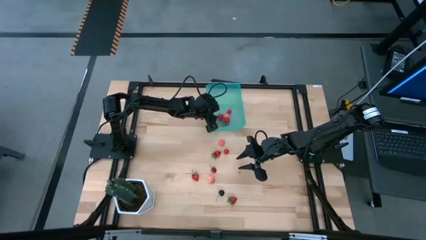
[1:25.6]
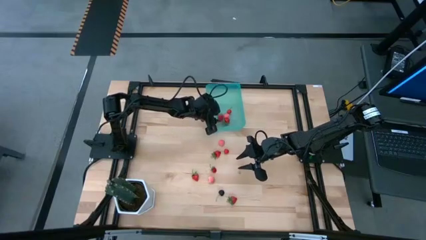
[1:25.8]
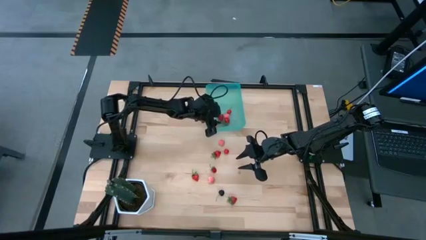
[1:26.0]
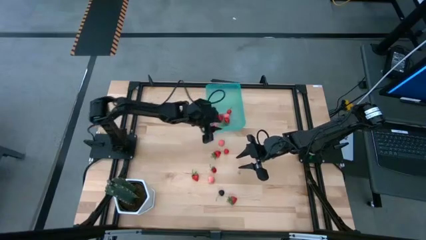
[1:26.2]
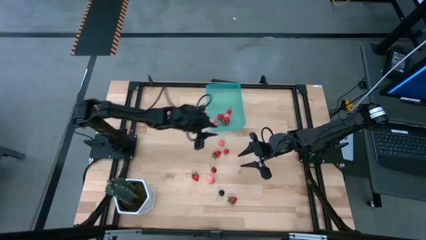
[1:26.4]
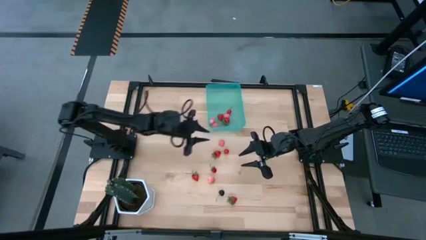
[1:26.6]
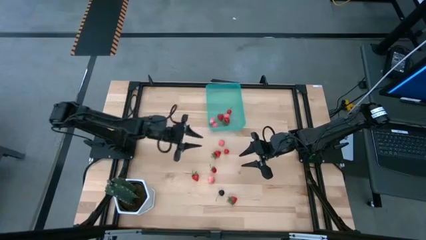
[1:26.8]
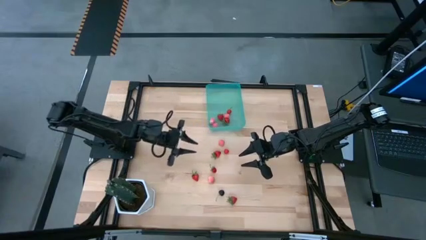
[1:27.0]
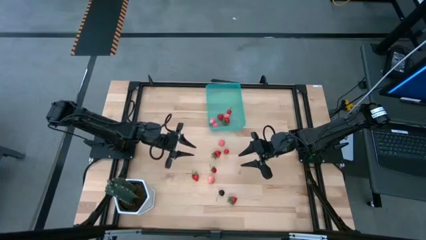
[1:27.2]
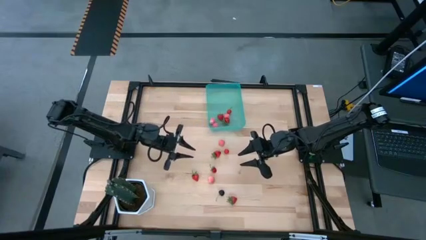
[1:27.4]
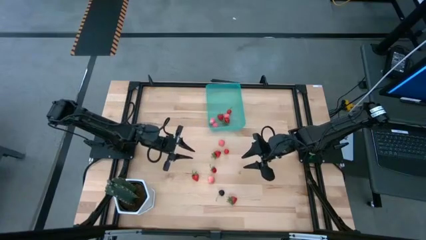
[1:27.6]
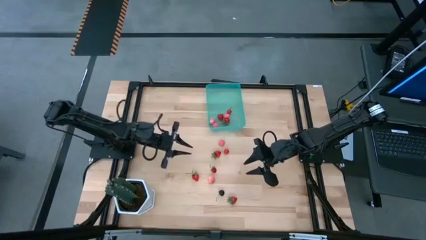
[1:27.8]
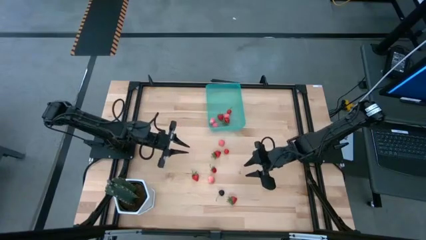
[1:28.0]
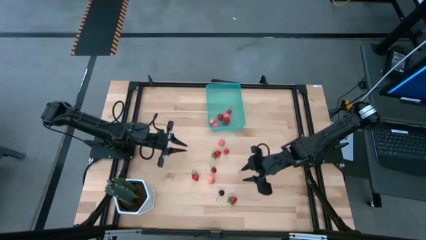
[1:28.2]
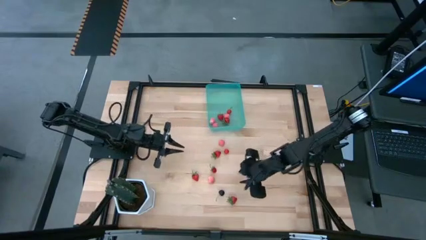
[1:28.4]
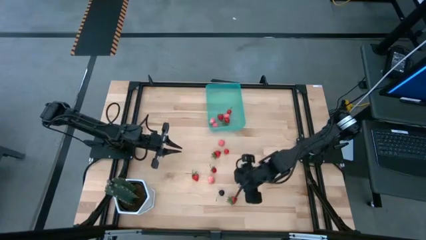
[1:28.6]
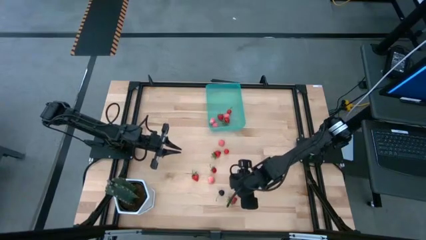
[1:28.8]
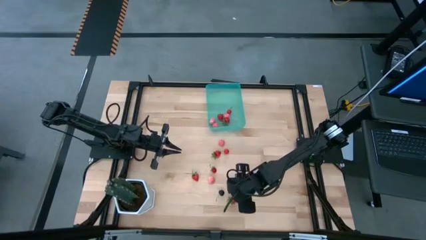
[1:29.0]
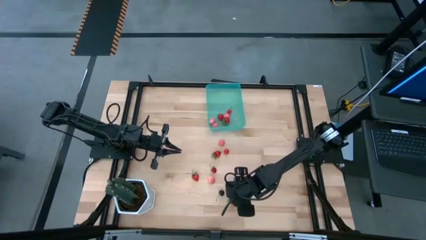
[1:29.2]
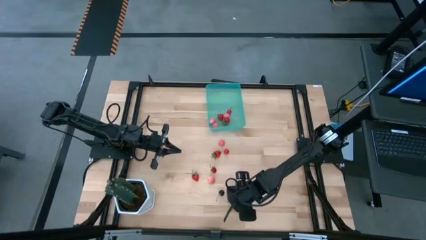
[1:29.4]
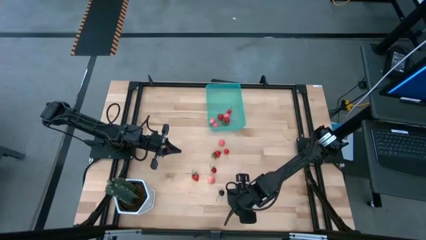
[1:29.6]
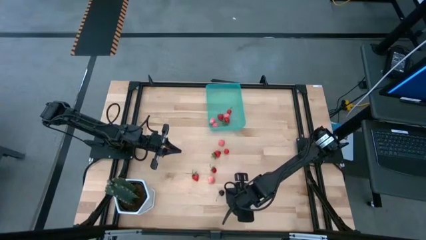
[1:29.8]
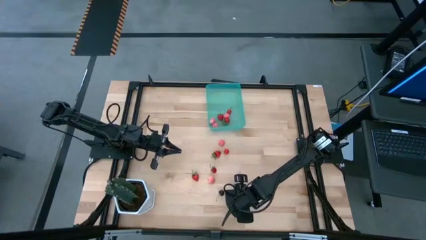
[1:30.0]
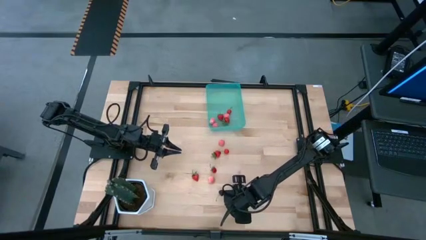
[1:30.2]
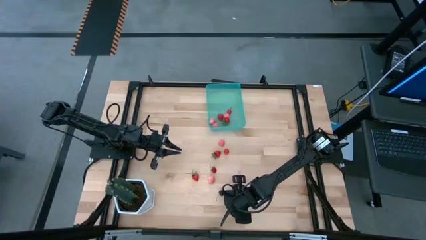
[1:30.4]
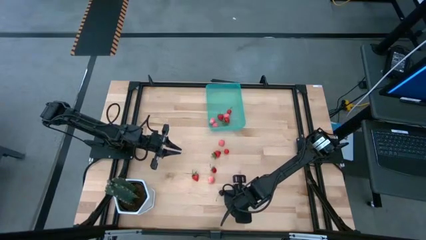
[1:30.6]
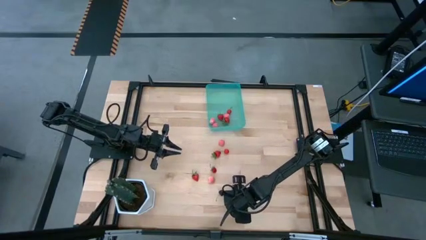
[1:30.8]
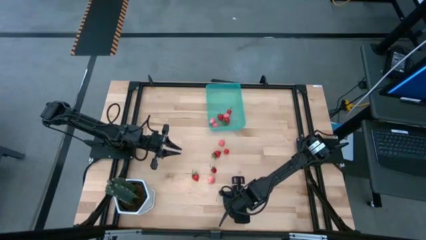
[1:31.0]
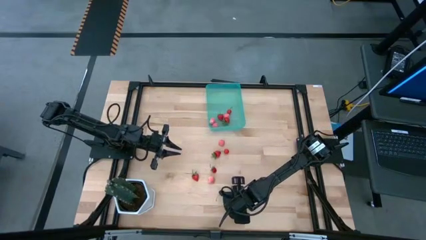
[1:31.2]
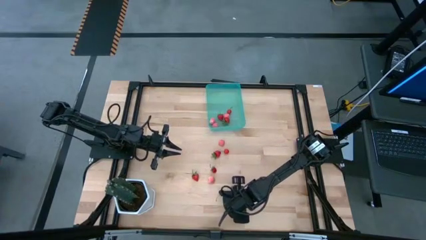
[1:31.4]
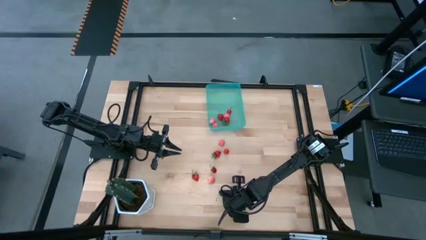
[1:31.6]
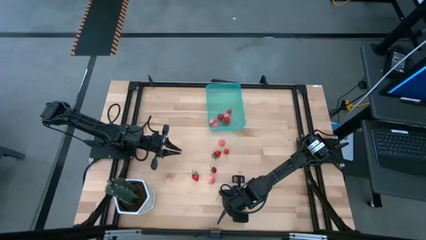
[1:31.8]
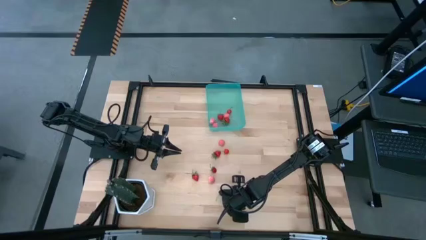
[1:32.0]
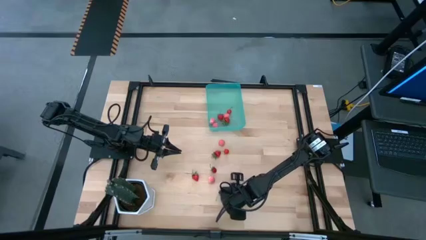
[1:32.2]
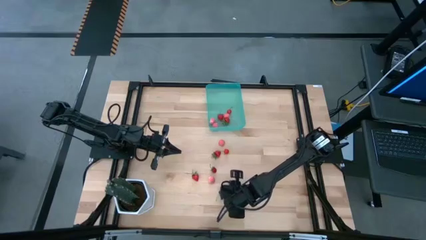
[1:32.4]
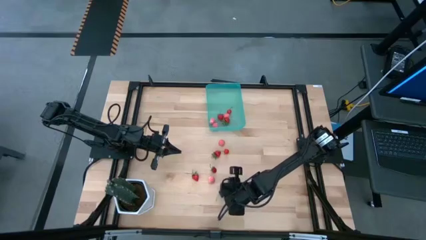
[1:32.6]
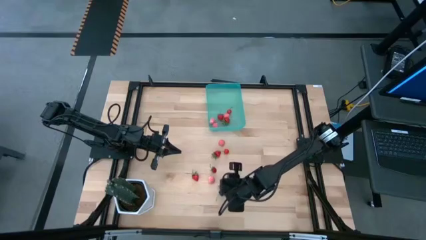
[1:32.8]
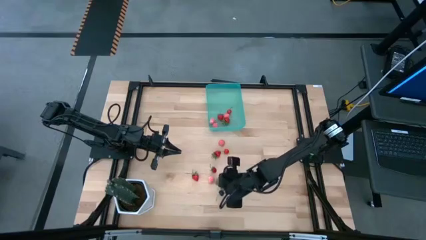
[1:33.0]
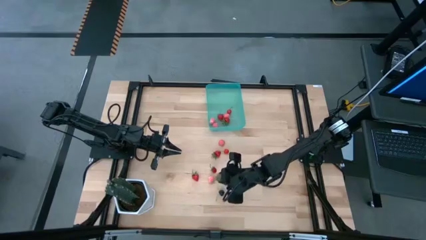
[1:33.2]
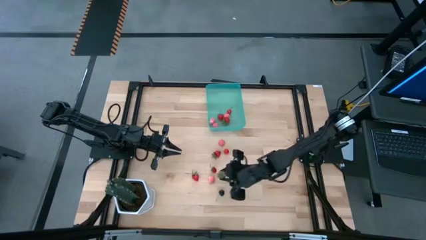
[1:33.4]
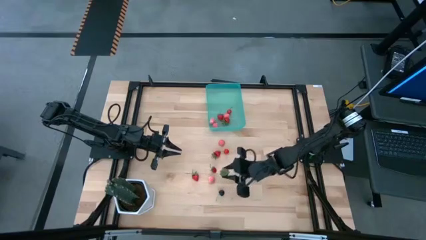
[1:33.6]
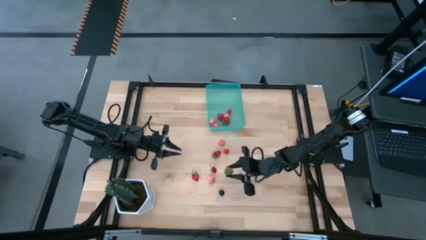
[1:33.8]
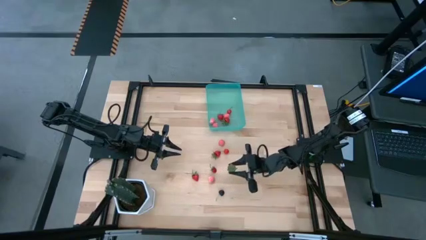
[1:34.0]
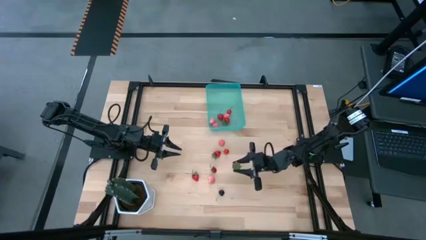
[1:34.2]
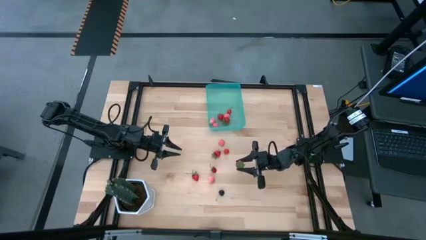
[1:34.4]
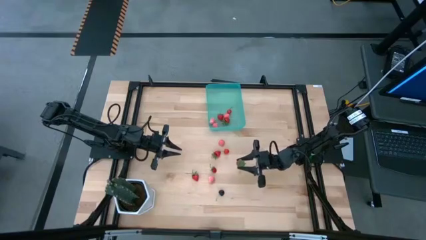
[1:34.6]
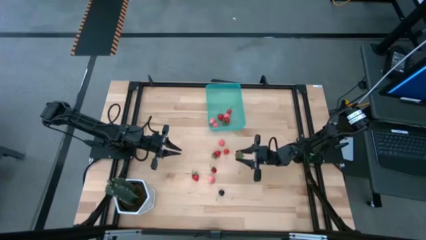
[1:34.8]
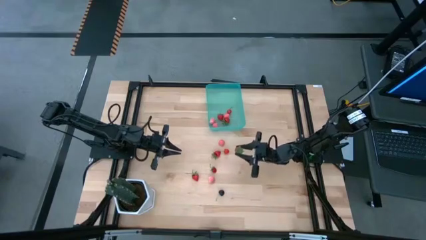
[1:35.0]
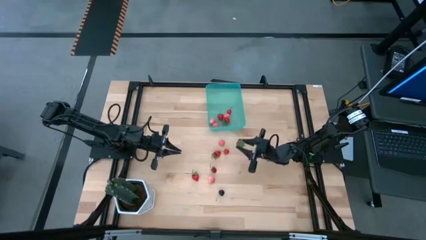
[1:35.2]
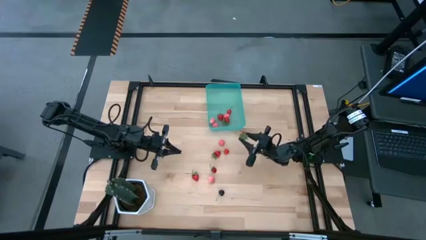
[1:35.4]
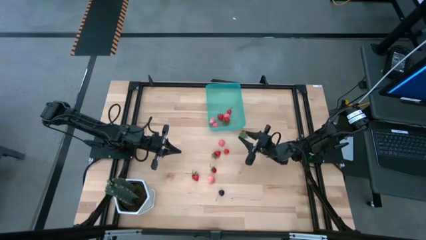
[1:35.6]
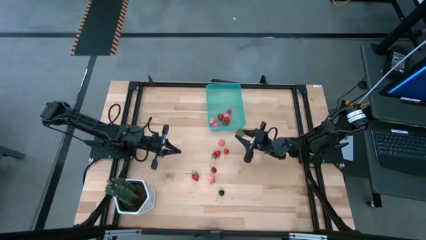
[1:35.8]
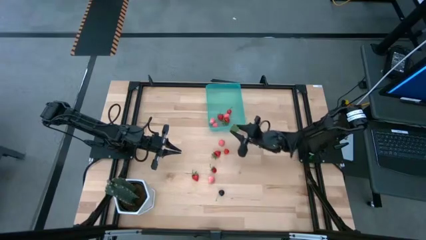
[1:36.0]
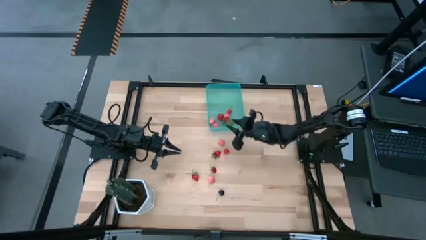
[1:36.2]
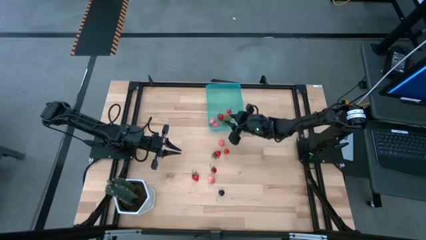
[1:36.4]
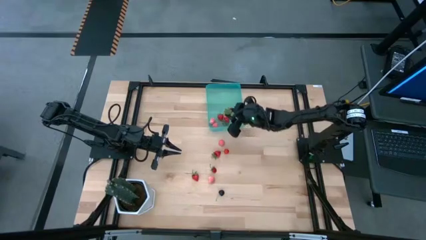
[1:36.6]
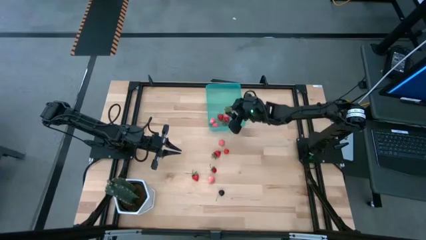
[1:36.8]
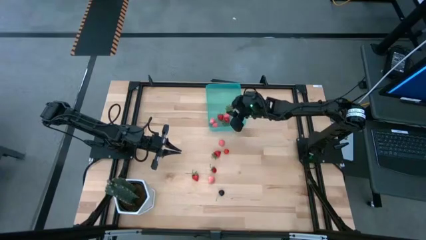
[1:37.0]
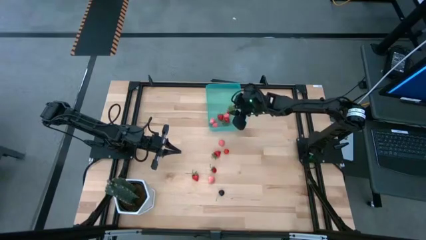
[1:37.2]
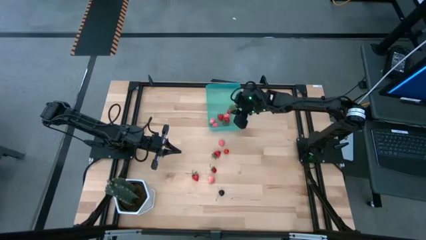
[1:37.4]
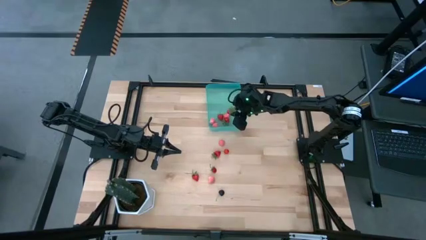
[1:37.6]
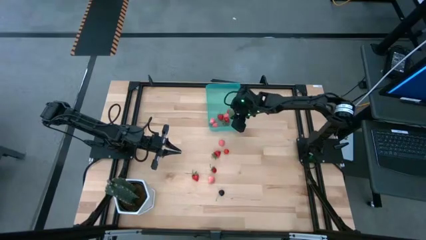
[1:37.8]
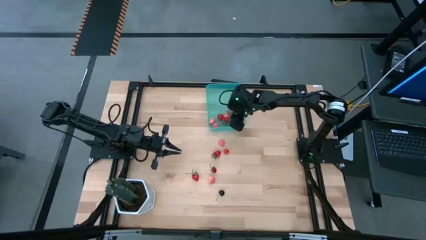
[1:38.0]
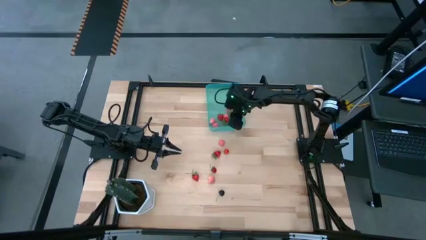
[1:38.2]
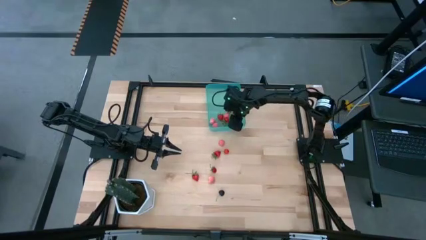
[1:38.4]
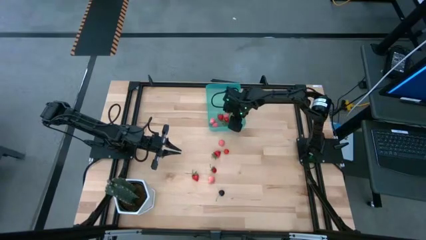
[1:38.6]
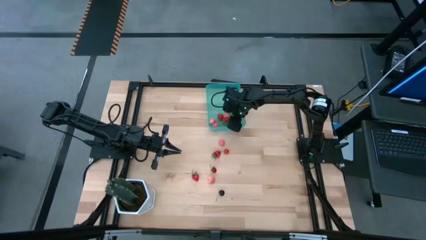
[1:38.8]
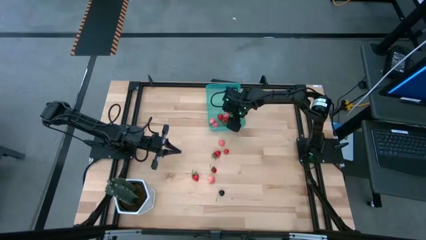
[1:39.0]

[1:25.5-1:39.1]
Task: Pick and placing Produce into tupperware
Put the red strawberry into the blue bin

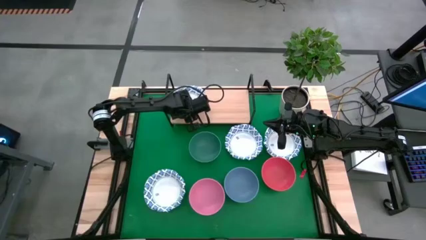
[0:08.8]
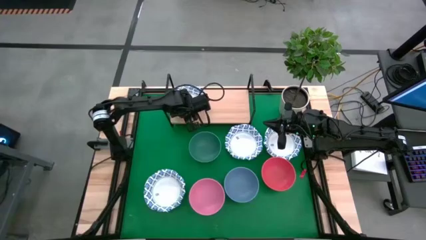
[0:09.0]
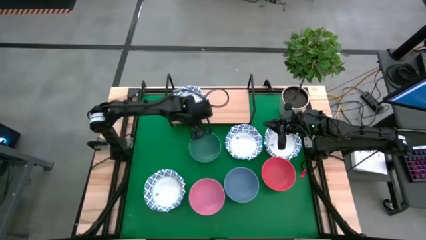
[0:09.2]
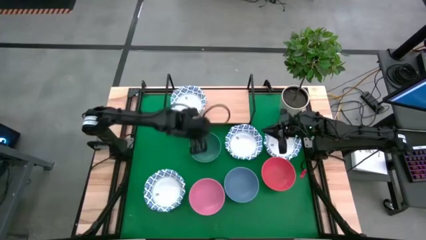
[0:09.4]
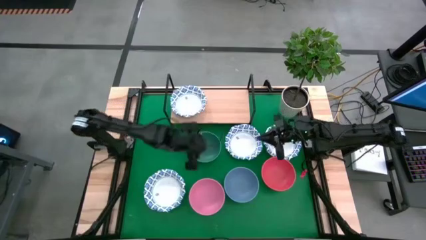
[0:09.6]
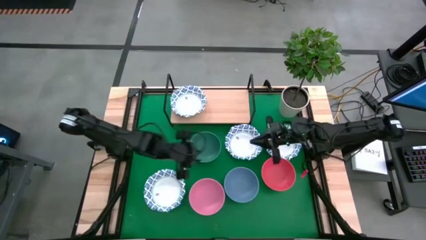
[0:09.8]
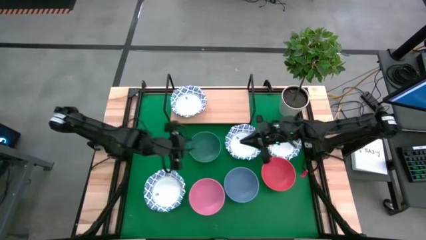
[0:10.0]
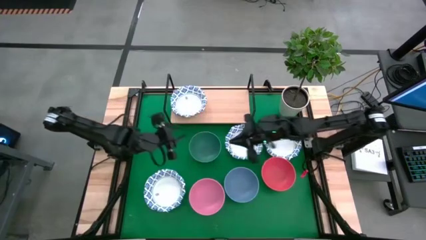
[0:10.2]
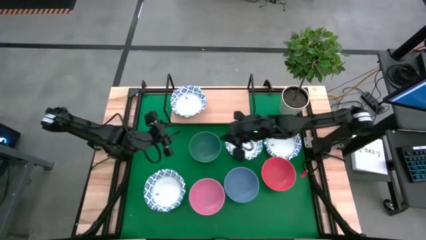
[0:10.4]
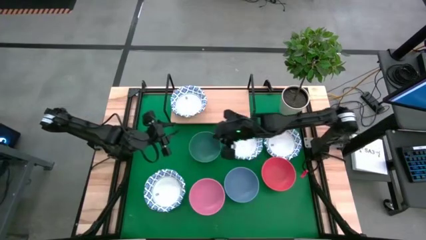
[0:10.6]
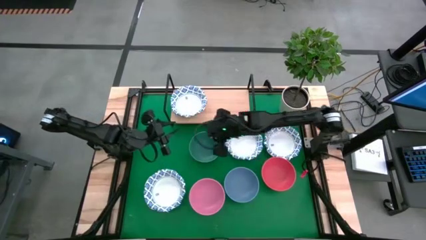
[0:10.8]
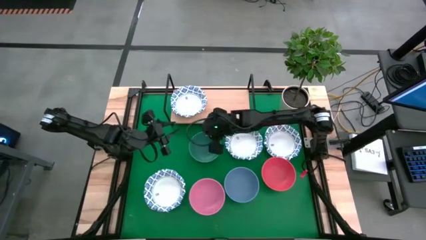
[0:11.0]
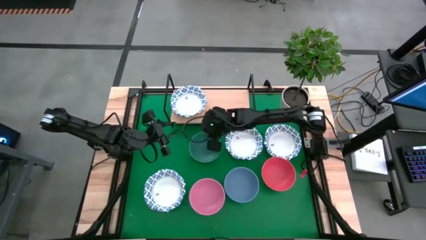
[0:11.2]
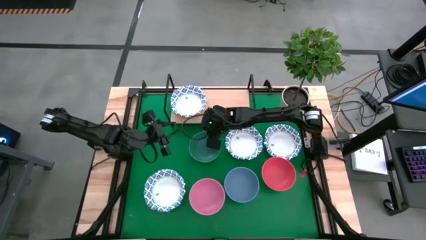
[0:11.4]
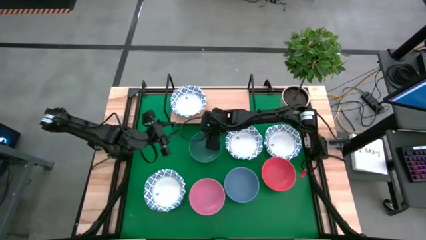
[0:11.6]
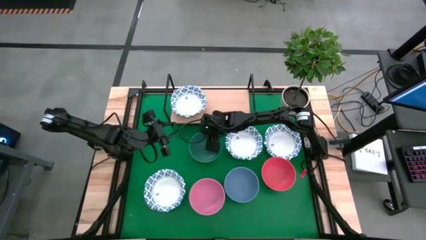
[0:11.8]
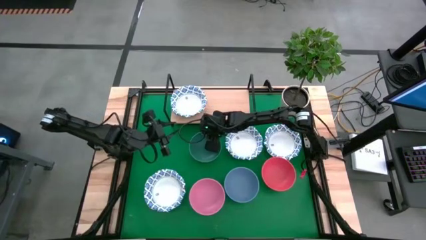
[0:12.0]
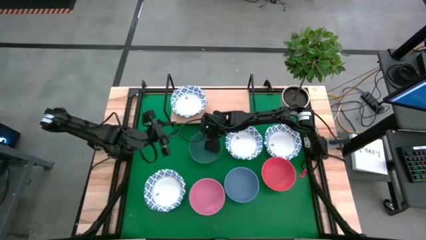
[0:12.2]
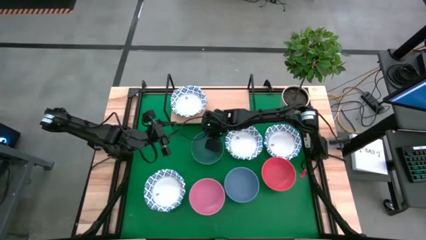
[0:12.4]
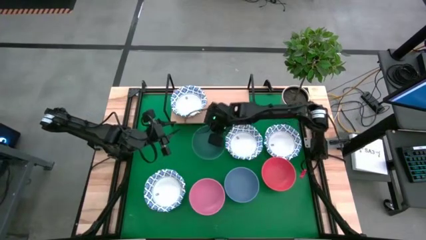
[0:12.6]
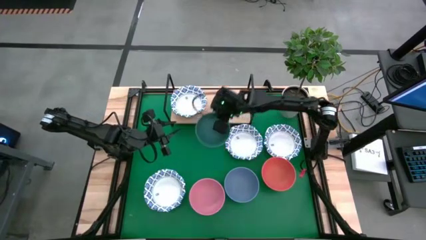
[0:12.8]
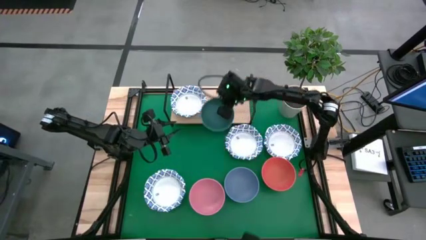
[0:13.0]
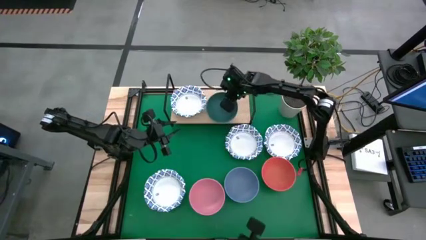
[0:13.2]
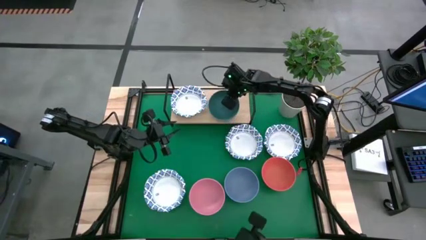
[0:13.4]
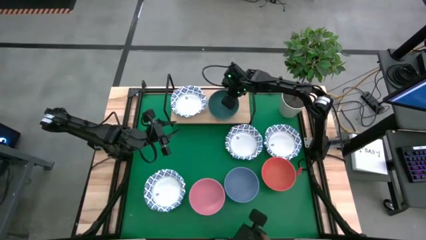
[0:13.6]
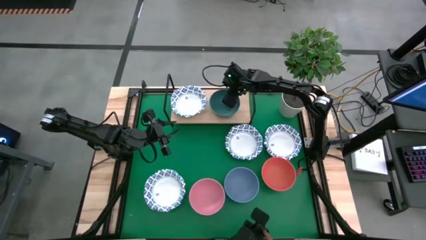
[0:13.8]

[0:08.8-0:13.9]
Task: Place and stack bowls onto a shelf
Put the green bowl on the shelf
